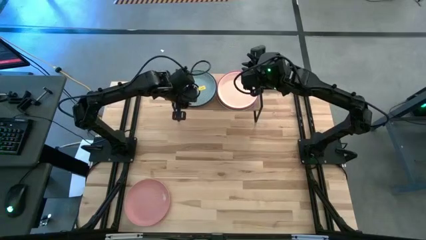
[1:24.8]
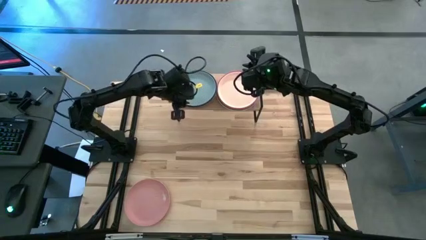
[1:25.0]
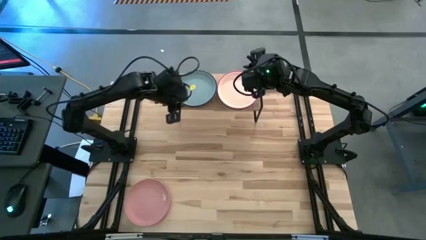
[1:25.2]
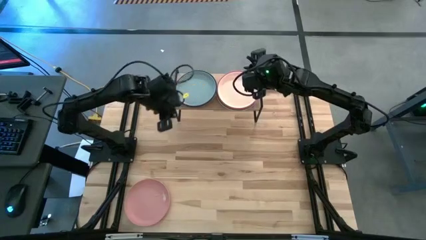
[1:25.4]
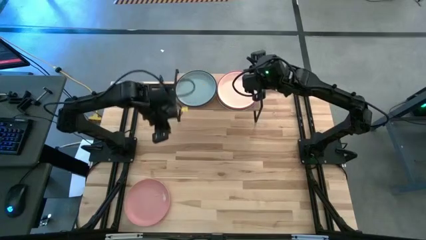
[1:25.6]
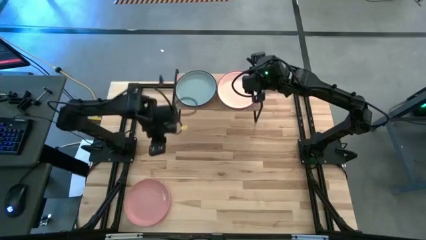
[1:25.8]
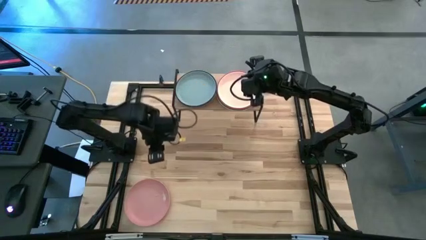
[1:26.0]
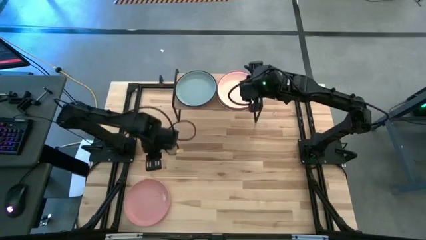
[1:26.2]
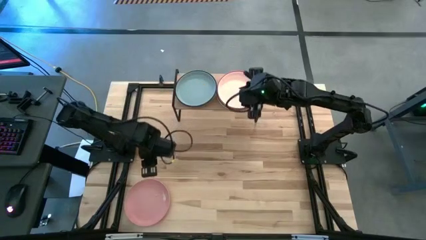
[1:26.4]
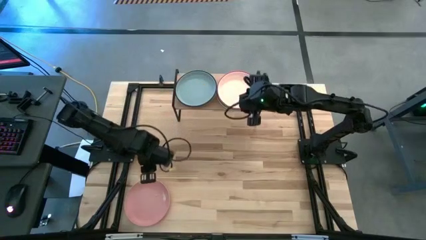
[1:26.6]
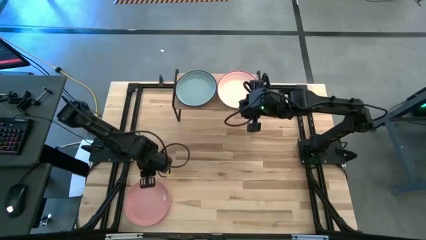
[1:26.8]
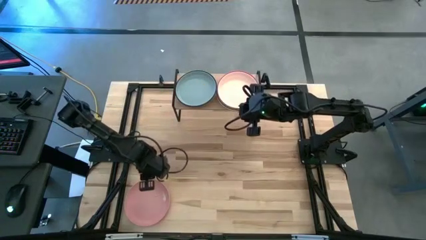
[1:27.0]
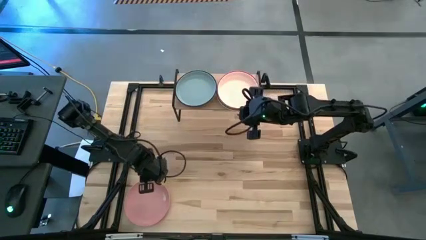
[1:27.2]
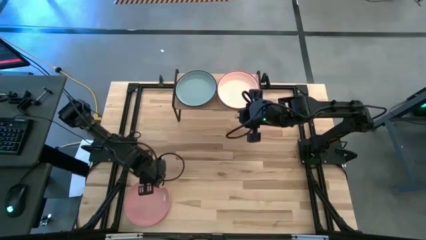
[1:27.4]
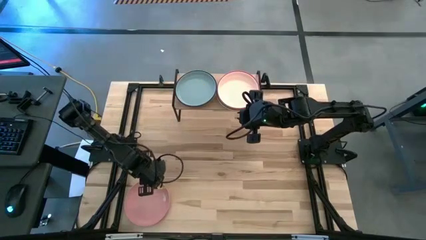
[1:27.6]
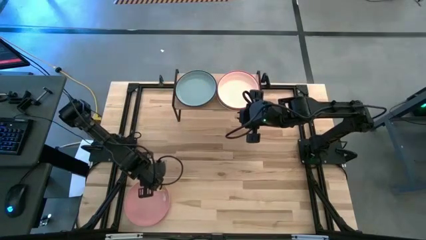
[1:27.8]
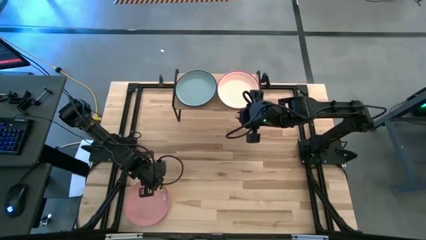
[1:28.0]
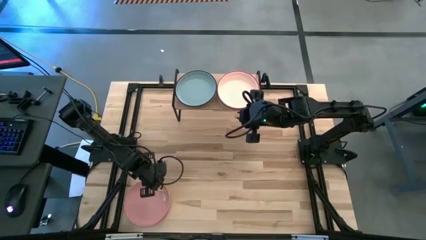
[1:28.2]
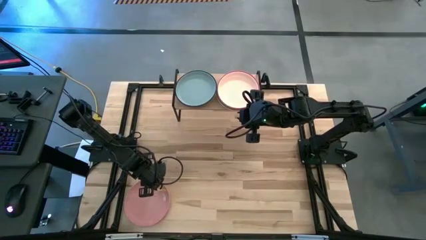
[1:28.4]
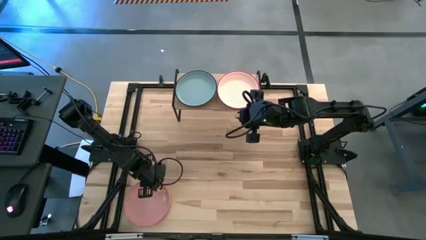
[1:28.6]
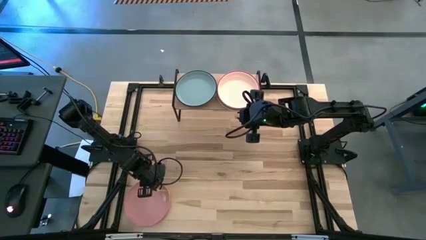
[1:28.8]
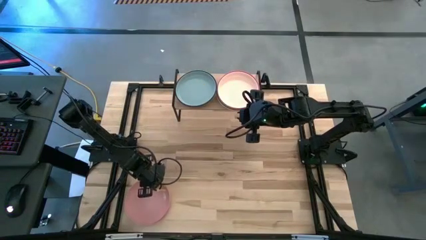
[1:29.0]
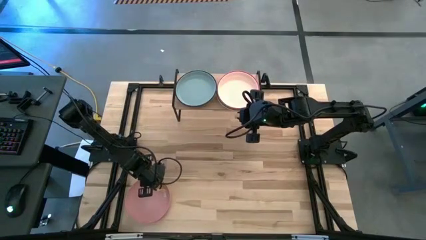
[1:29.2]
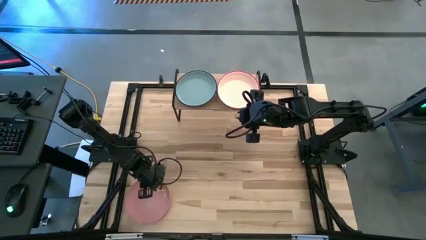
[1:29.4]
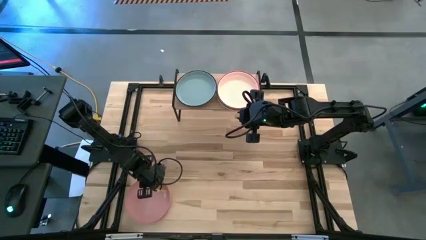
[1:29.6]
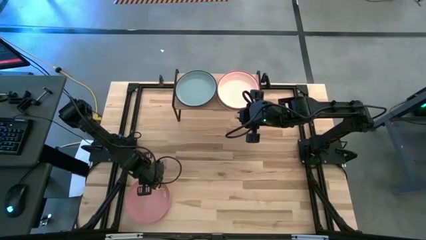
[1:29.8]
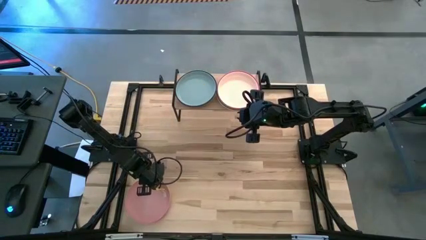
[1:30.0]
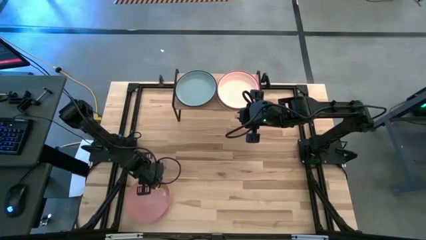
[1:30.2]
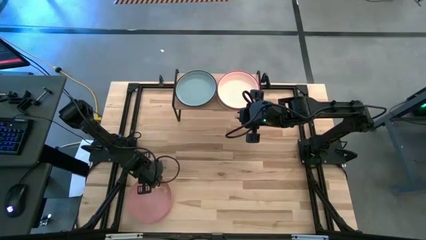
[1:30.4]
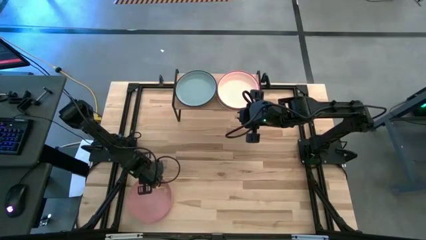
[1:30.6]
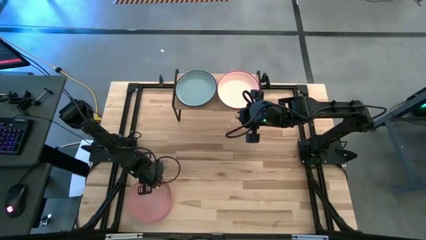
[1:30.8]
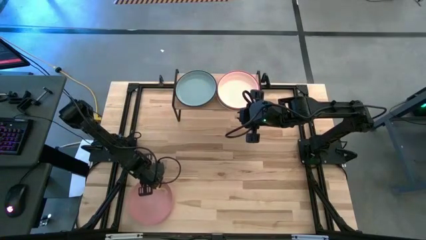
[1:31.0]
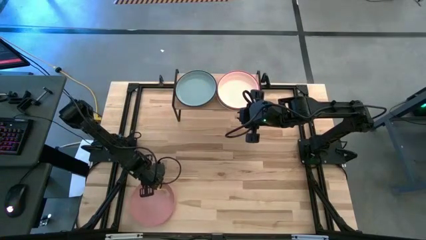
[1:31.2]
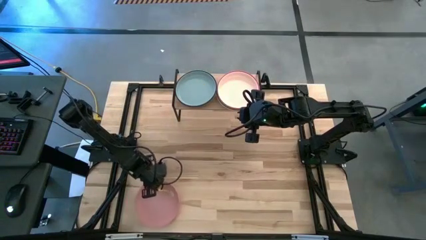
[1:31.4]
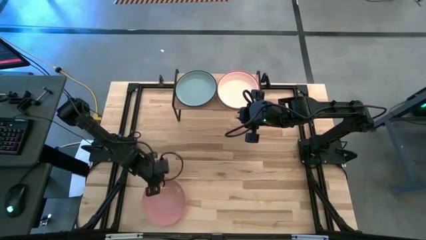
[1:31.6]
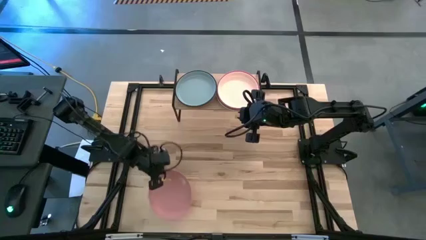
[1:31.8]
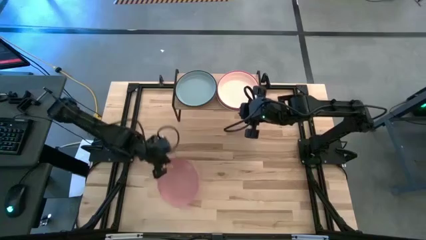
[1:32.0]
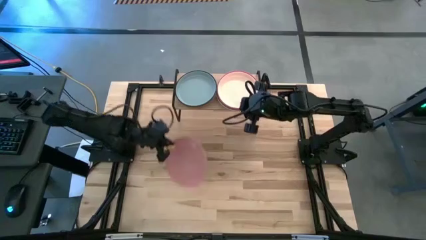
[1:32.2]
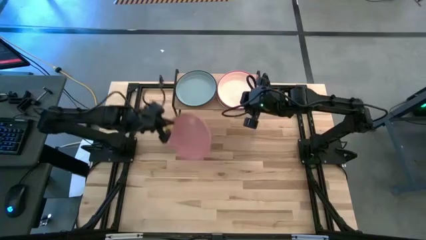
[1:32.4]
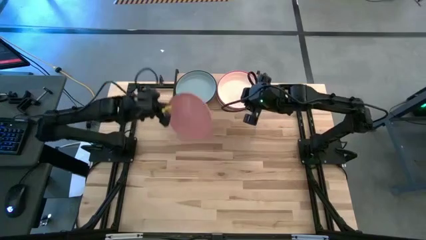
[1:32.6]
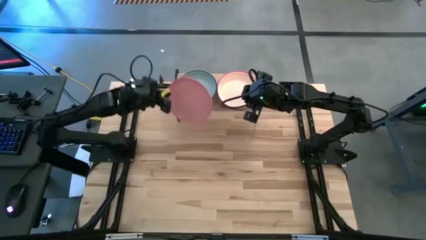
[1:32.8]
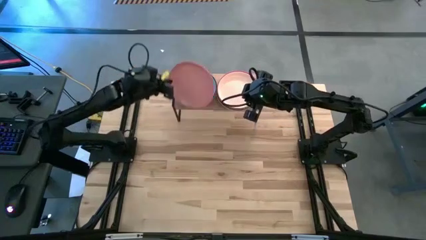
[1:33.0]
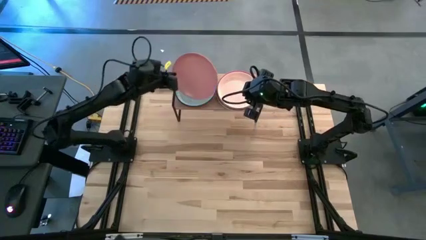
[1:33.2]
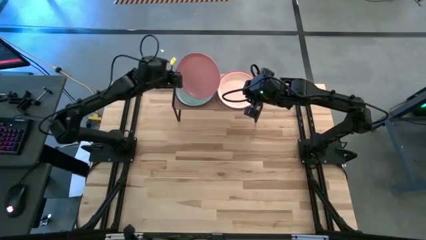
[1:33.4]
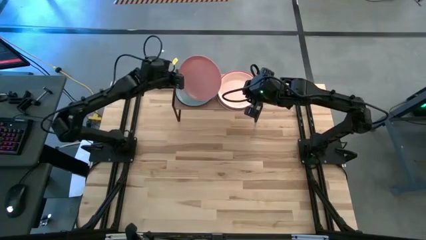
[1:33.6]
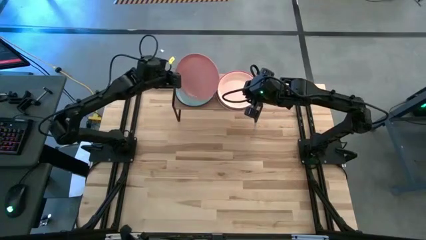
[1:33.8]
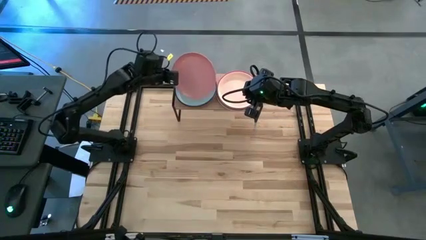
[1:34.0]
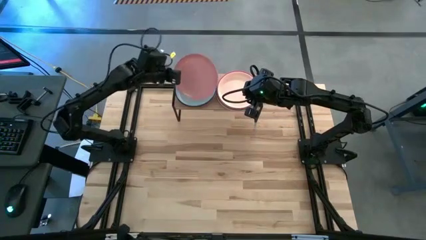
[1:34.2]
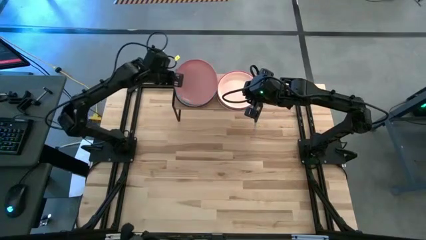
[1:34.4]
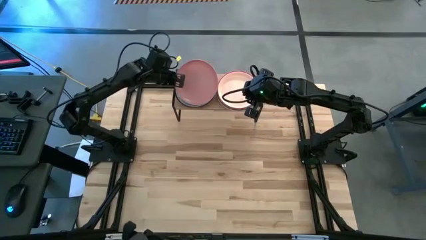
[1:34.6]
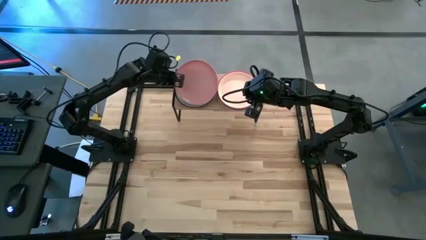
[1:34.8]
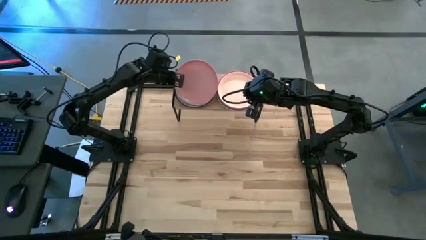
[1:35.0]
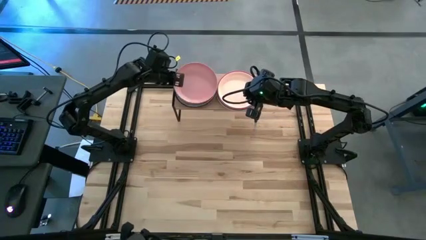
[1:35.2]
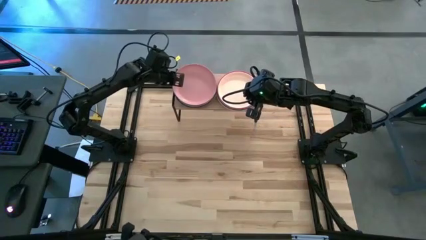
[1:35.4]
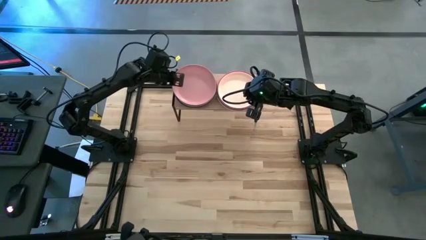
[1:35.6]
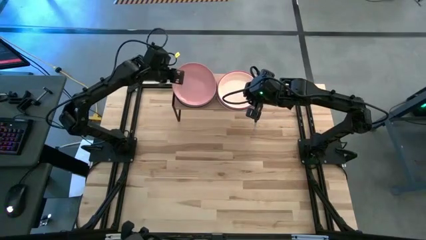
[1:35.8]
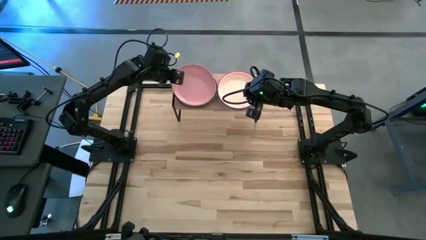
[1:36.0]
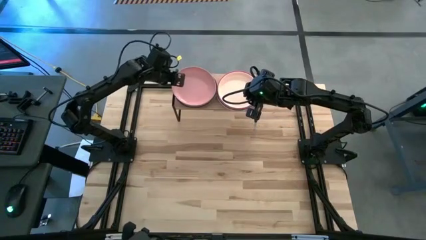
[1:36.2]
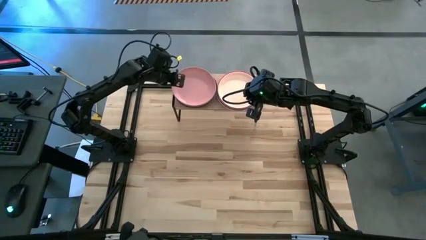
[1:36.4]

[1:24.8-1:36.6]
Task: Place and stack plates onto a shelf
Stack the light pink plate on top of the light blue plate on the shelf

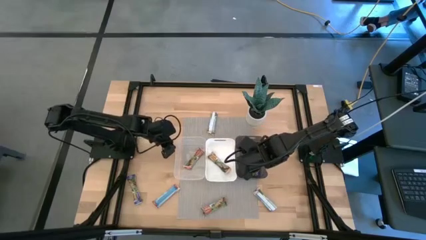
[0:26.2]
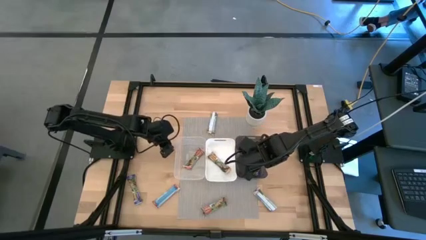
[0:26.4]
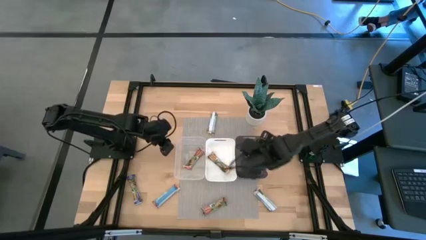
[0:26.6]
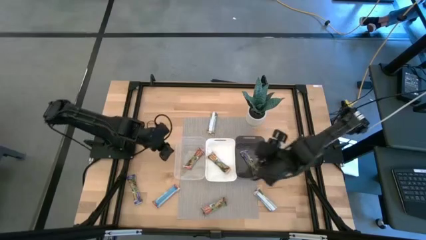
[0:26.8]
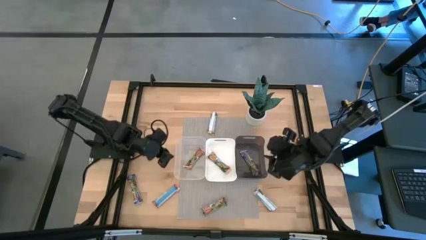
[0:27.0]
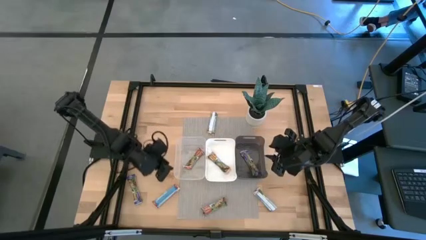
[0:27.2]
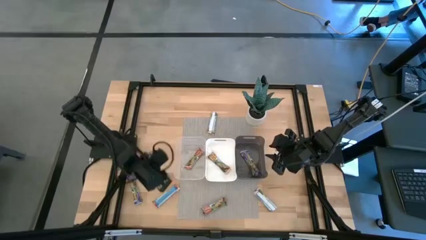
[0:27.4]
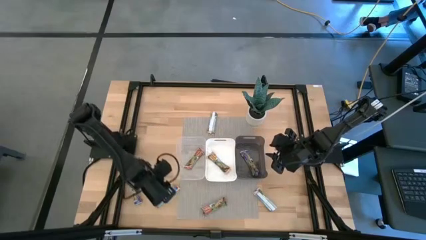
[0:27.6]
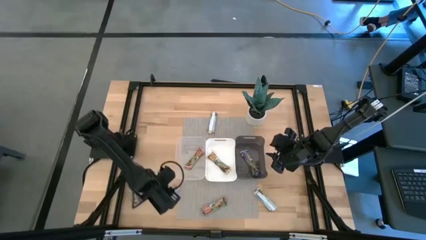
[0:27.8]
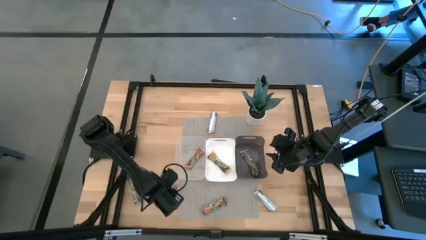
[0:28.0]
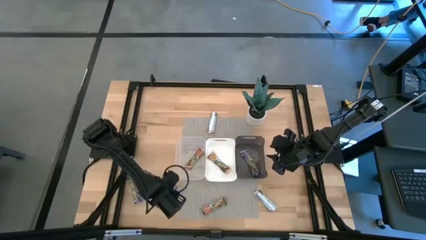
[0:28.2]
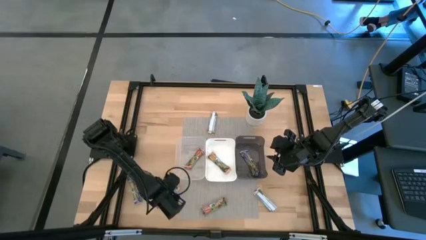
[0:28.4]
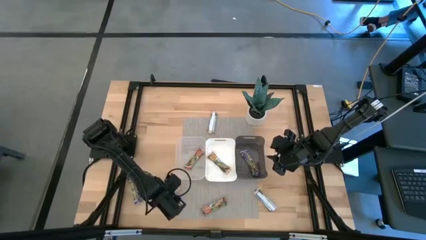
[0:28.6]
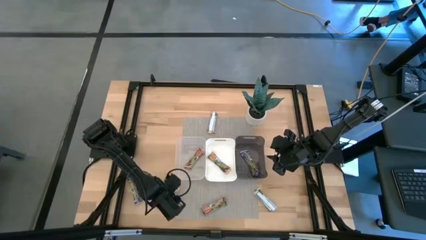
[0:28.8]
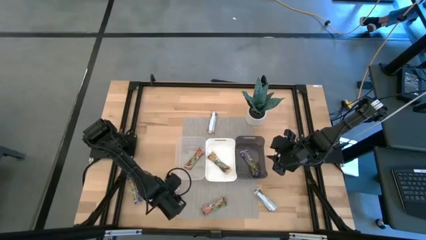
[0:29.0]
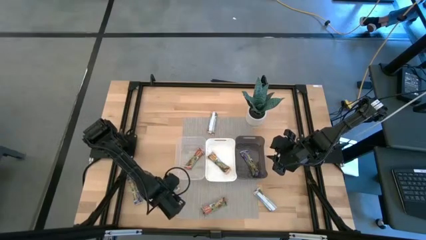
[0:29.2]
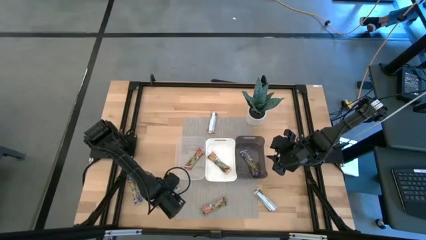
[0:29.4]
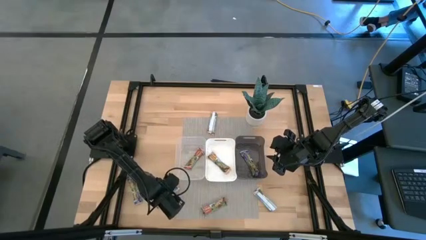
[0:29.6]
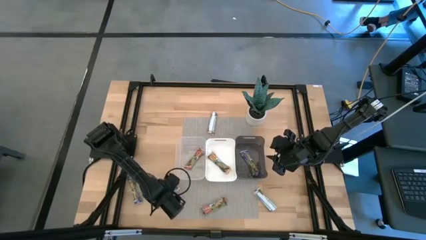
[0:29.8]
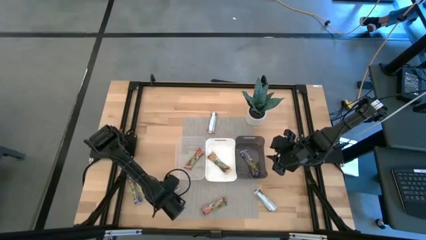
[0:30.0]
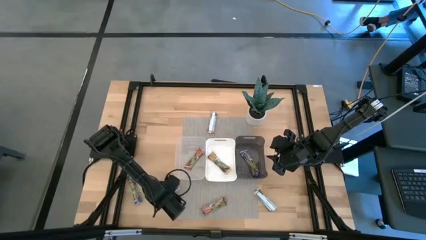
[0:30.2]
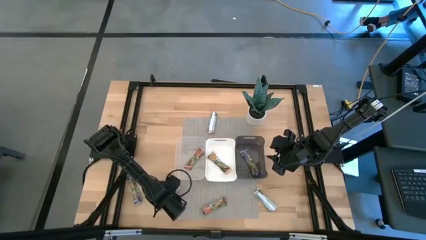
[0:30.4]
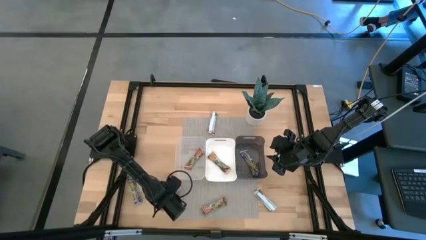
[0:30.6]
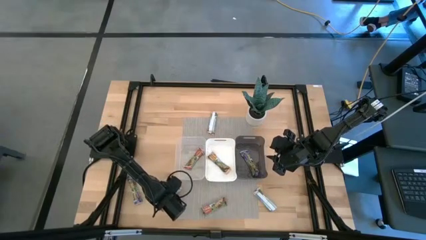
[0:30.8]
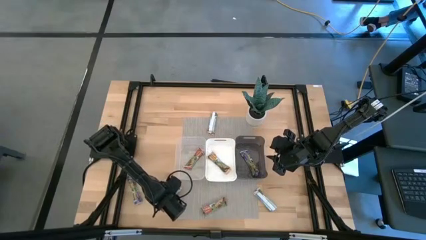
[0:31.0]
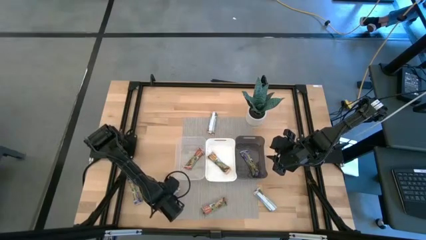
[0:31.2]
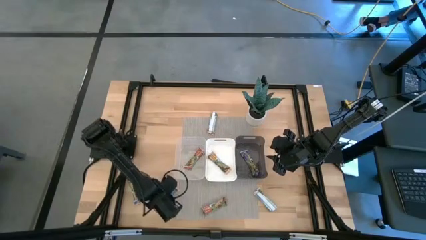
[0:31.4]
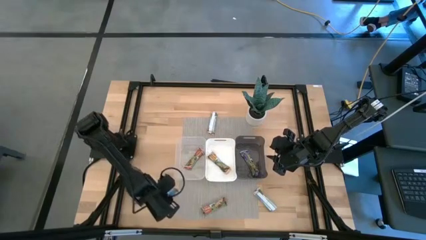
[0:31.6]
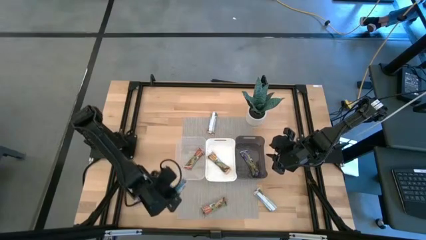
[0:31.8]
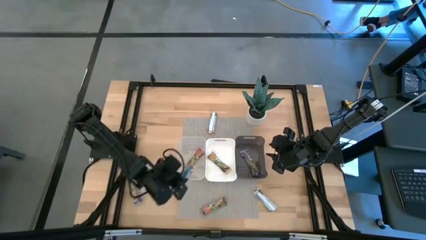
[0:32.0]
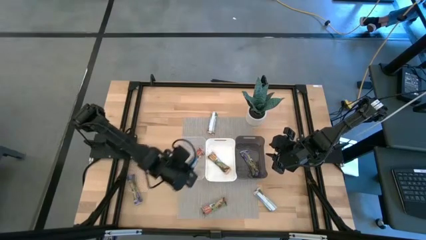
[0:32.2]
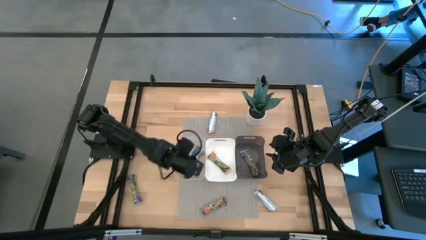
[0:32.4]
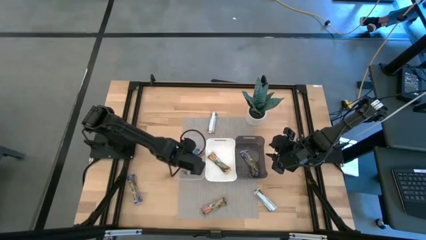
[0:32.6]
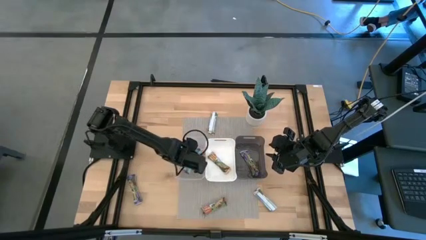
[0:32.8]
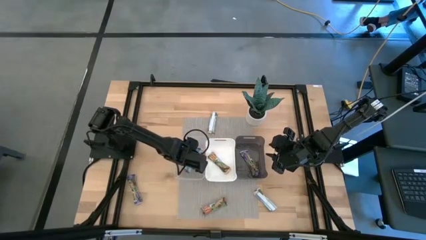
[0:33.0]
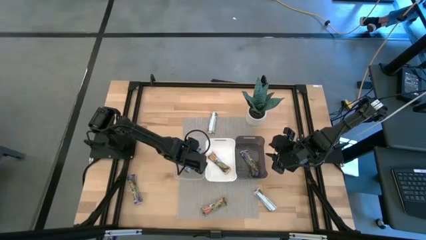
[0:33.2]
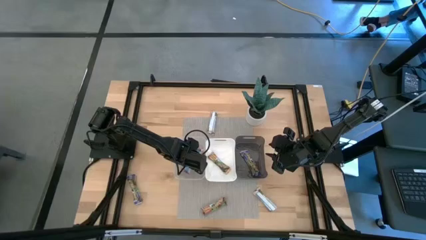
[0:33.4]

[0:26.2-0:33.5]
Task: Pick and place Granola Bars by type
Put the left red granola bar into the transparent bin
